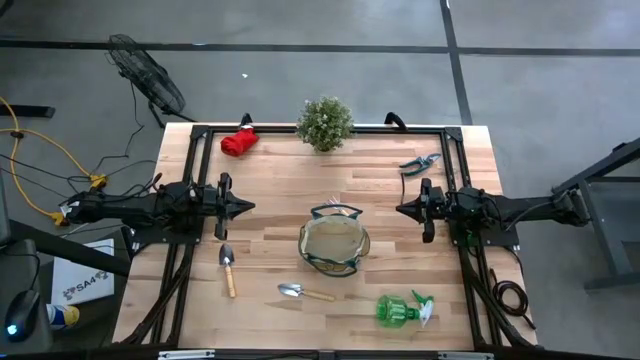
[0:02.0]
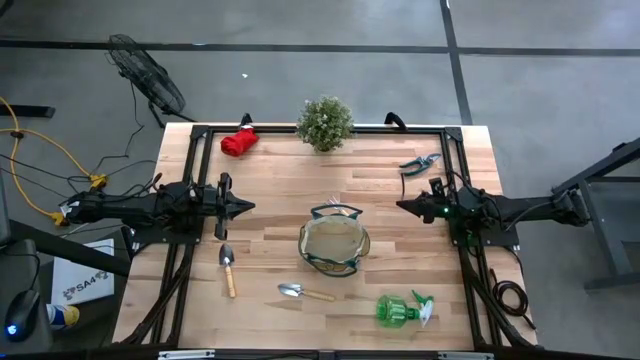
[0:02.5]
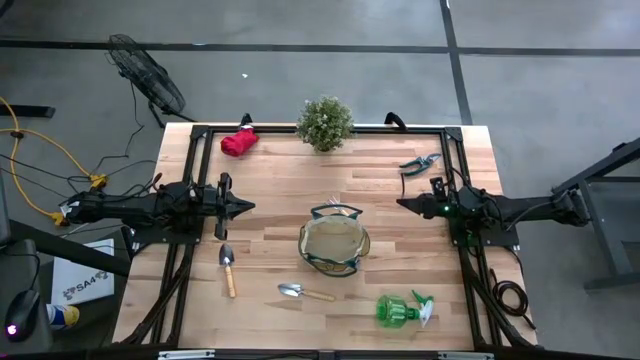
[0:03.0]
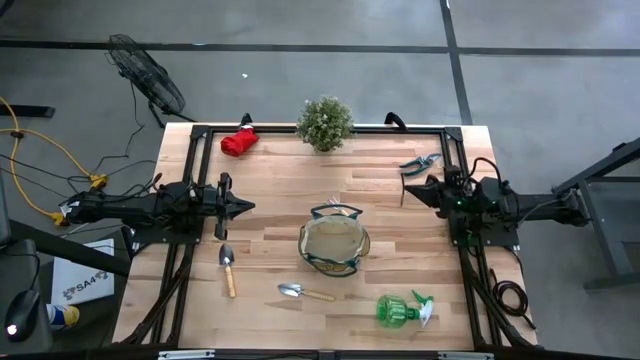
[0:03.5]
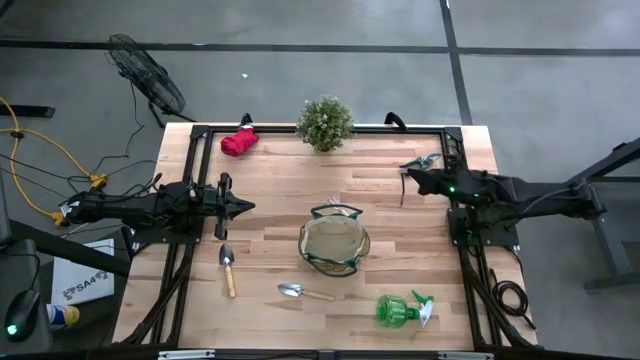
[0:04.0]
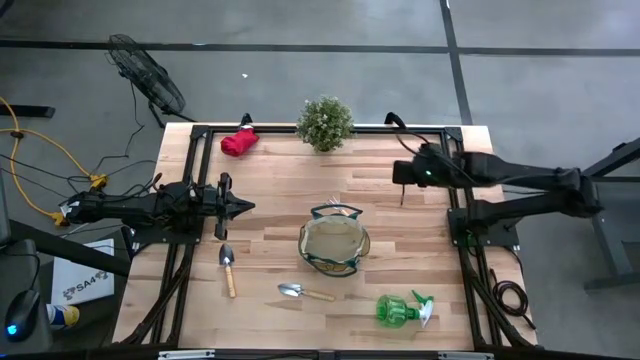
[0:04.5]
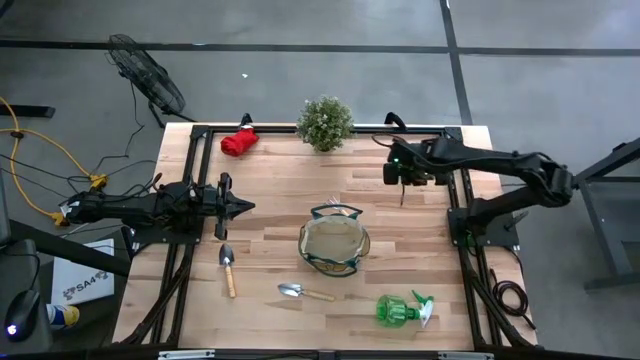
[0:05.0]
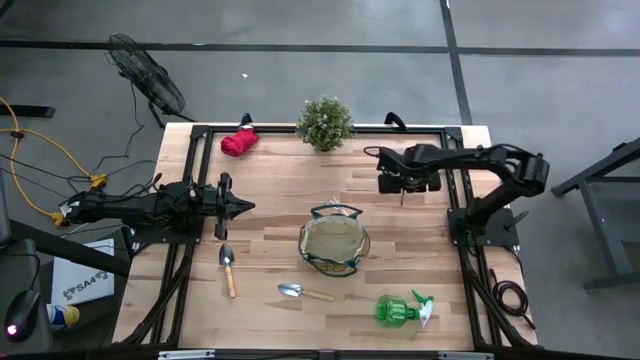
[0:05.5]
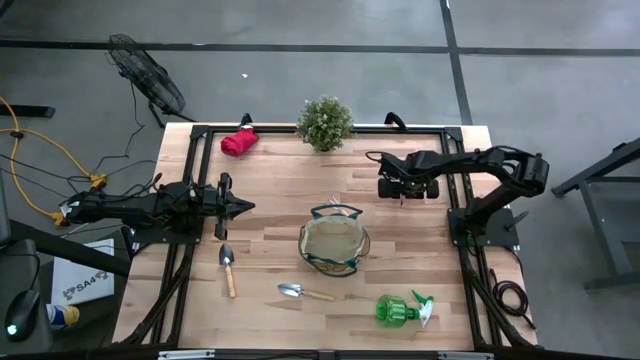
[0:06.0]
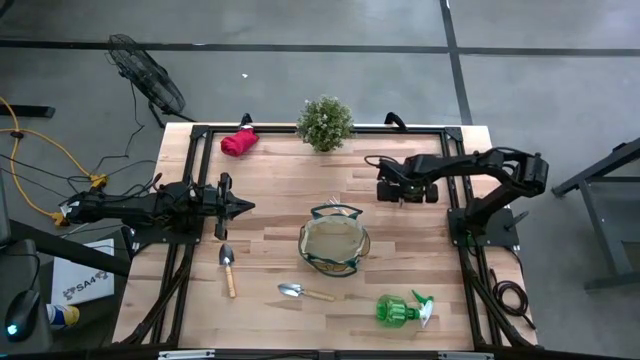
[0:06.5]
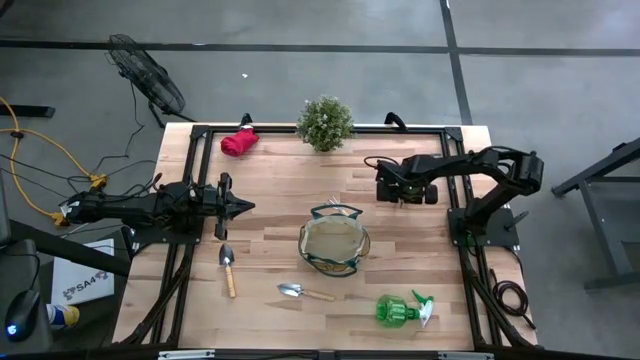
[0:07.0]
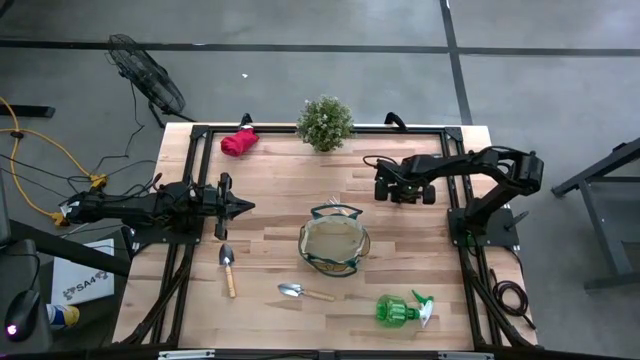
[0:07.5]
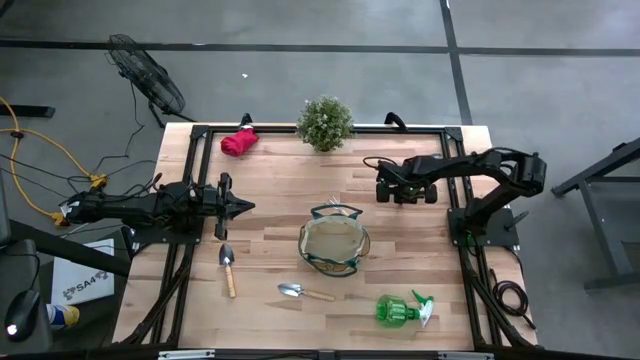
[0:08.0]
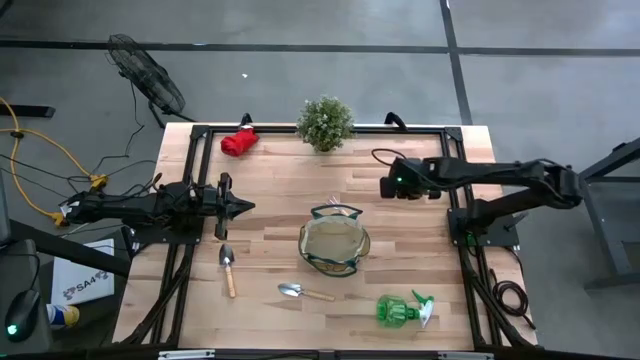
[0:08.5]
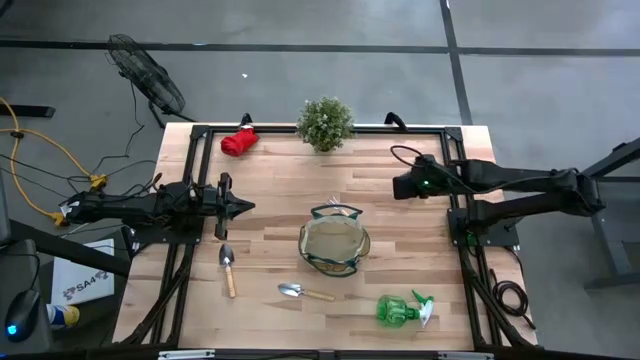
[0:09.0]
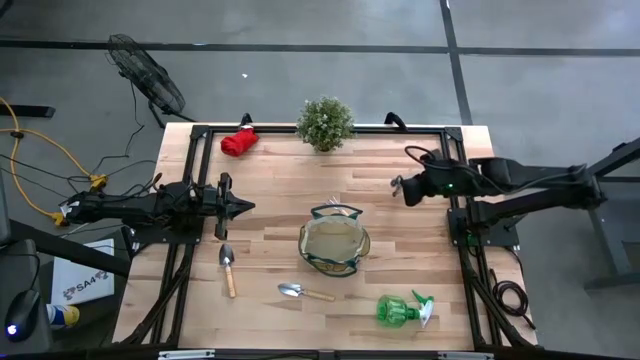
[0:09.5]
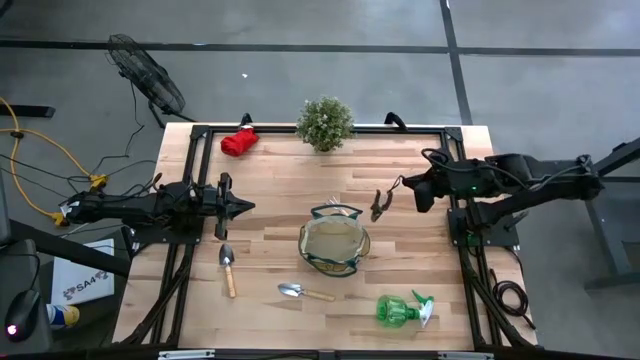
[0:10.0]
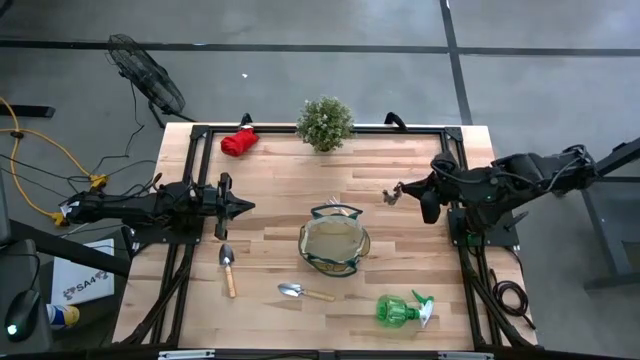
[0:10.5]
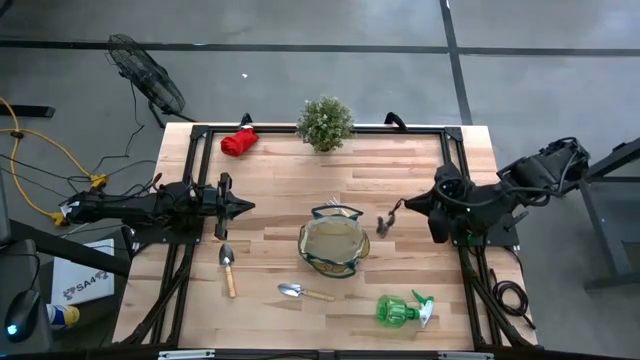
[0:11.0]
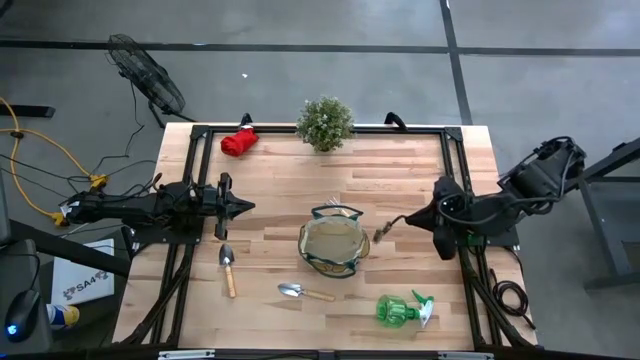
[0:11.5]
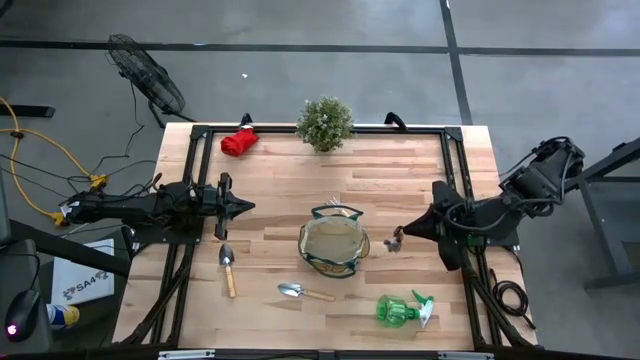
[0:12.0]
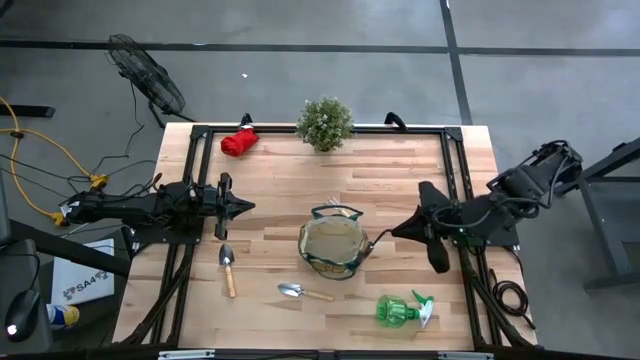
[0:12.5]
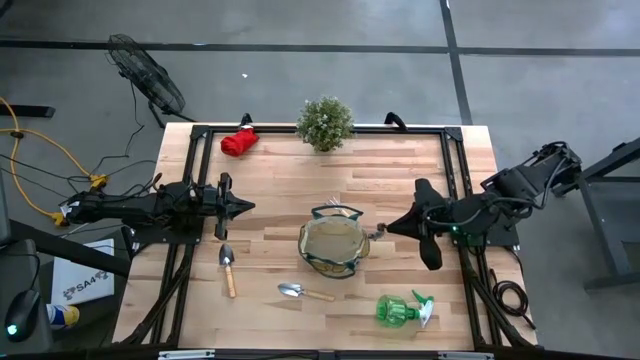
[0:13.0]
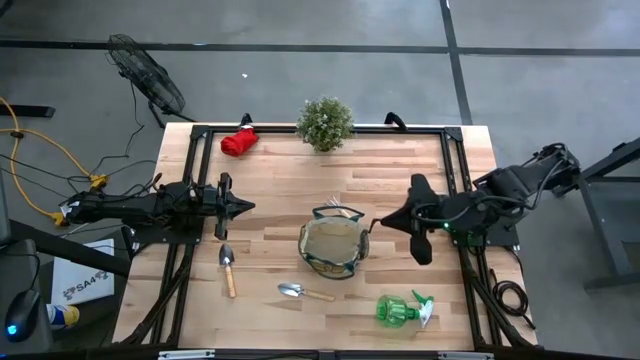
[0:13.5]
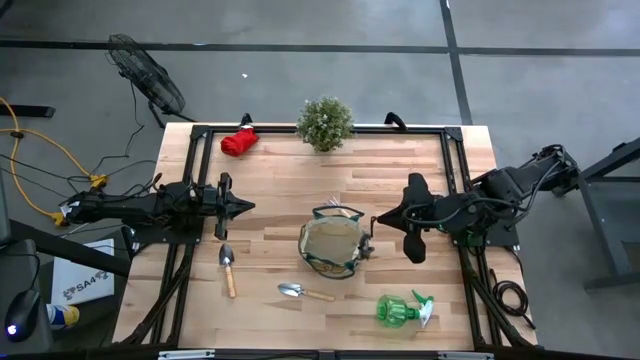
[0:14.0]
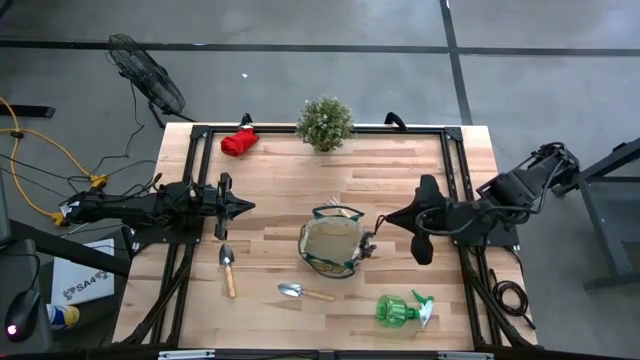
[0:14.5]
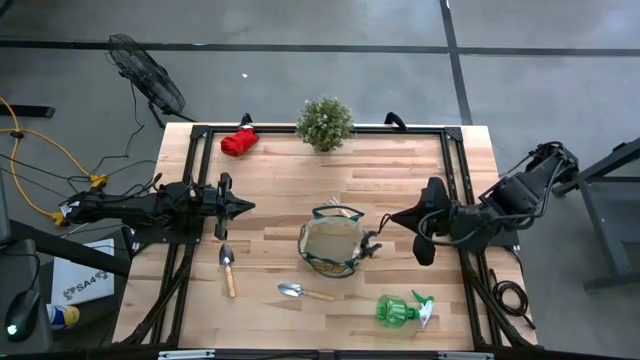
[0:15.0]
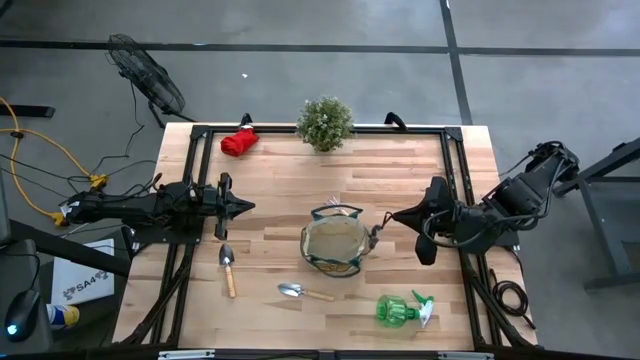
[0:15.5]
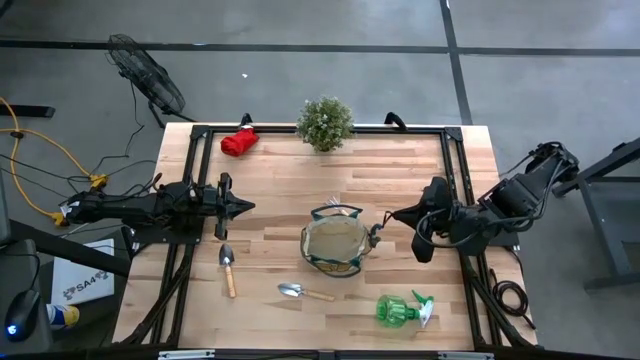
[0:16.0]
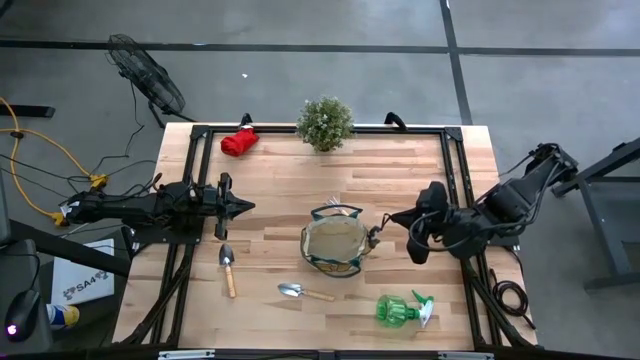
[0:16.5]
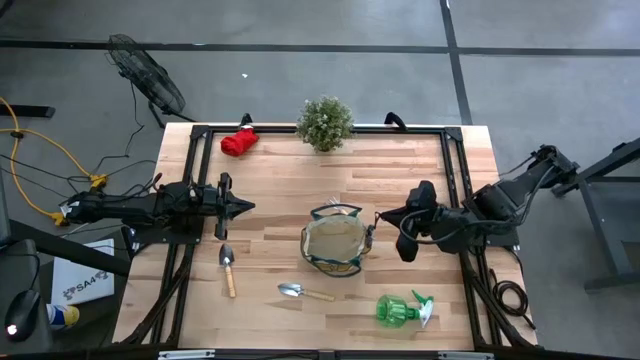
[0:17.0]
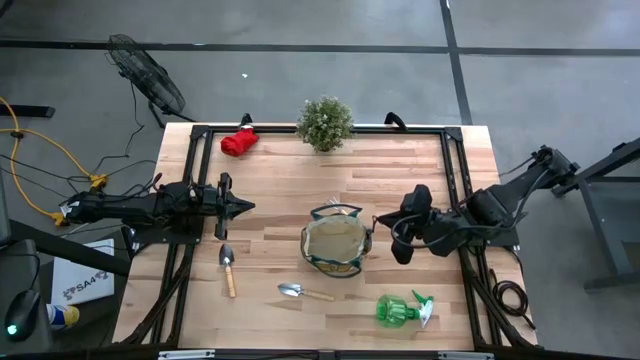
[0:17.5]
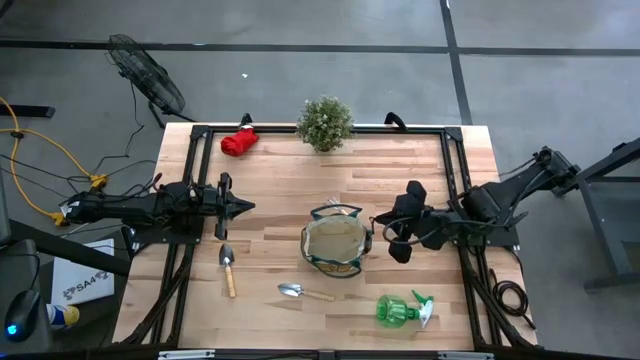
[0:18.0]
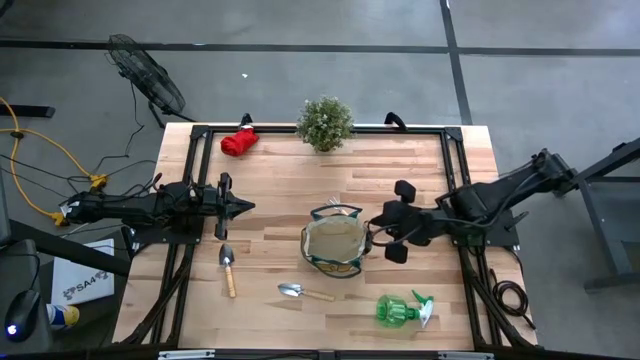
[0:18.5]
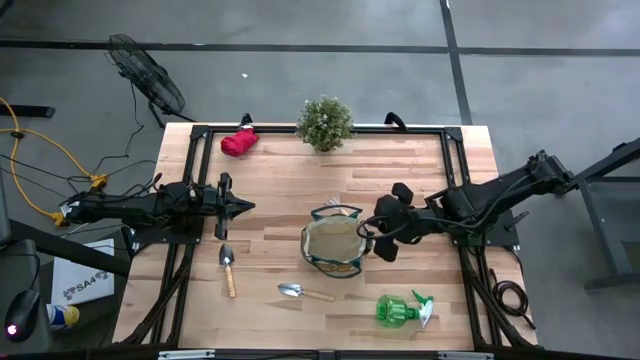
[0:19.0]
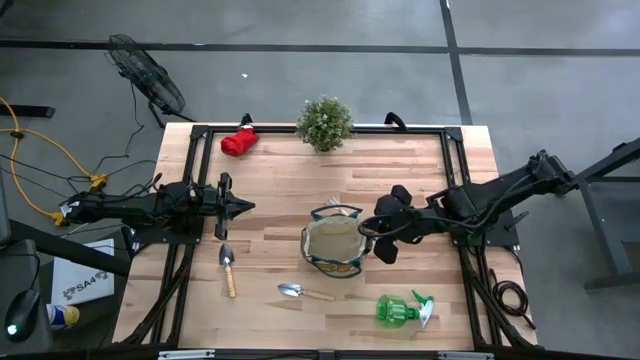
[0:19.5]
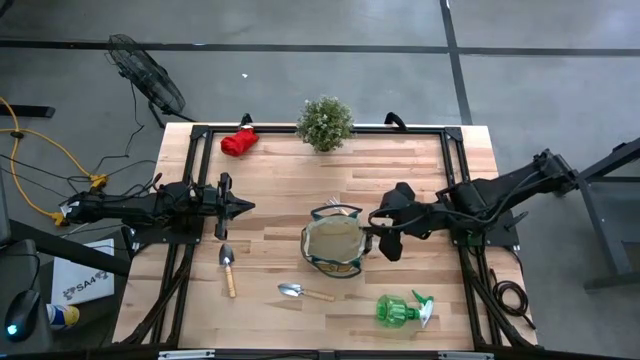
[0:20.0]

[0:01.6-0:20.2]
Task: Pick & Place Garden tools in Gardening bag
Put the top green shear scissors into the brown gardening bag
